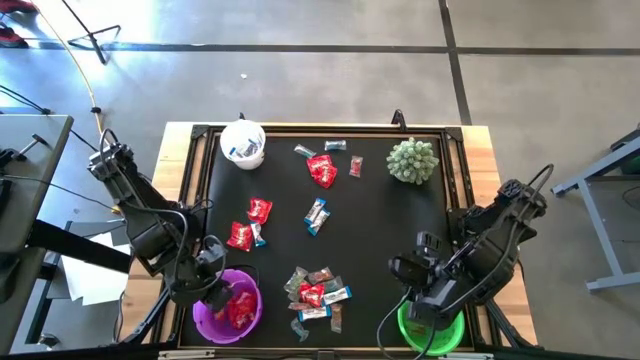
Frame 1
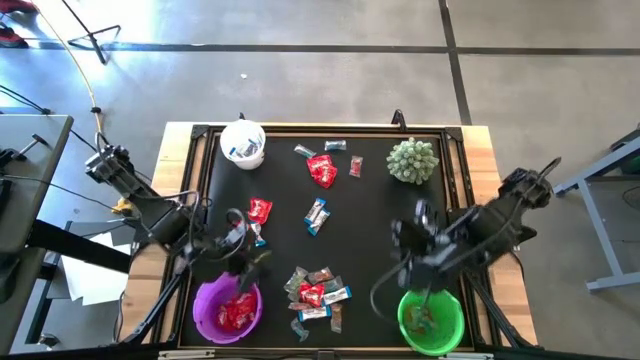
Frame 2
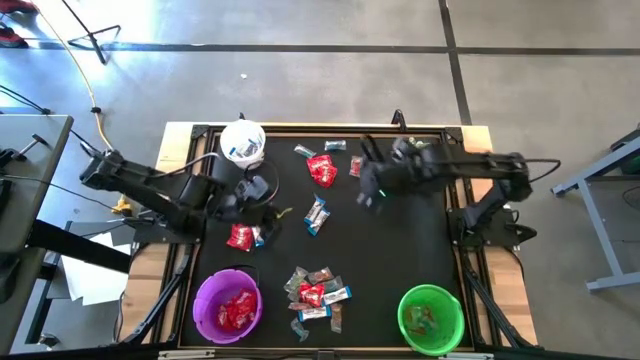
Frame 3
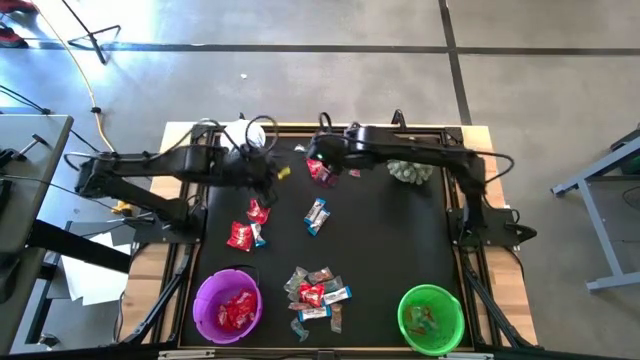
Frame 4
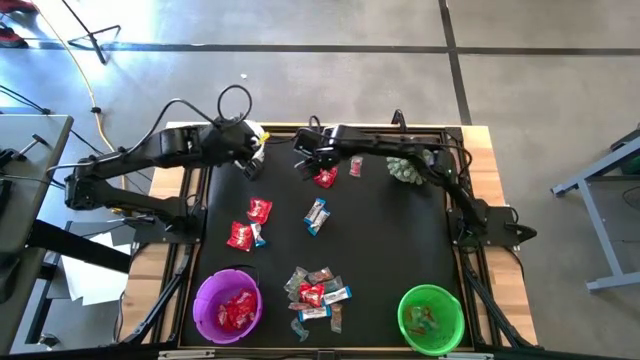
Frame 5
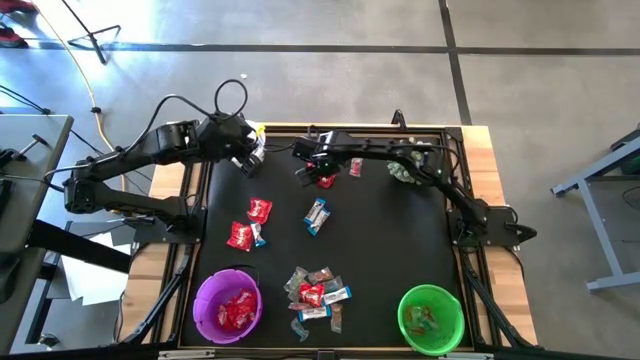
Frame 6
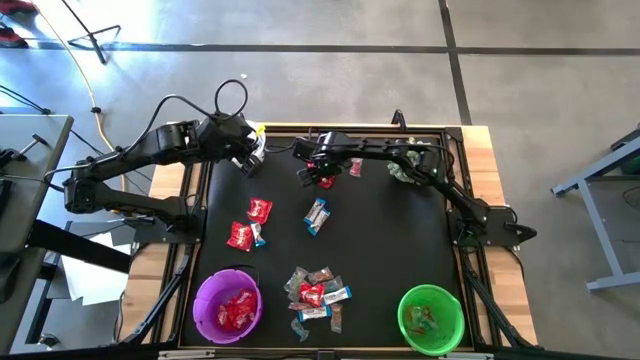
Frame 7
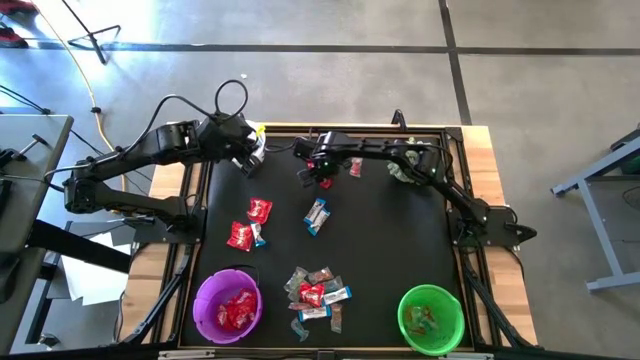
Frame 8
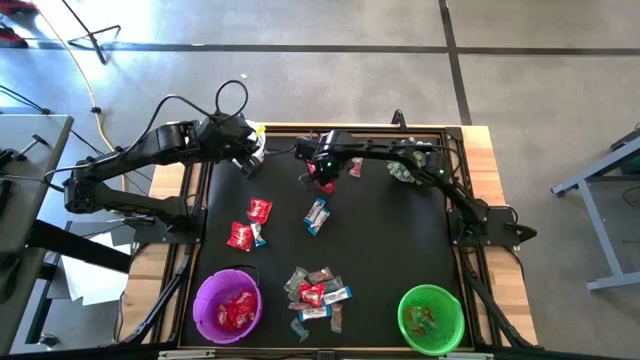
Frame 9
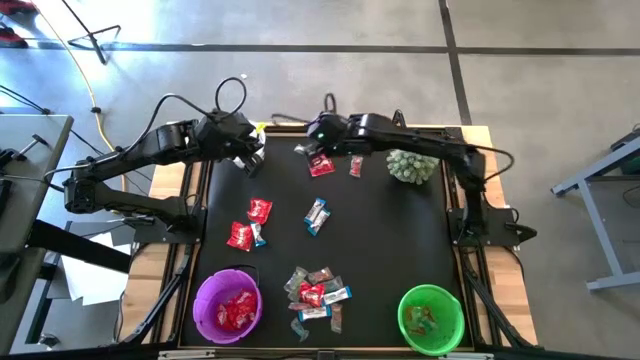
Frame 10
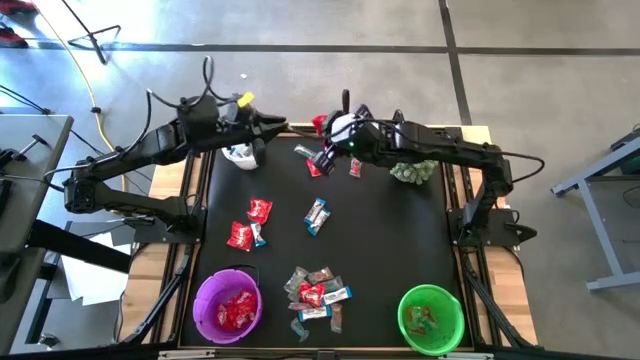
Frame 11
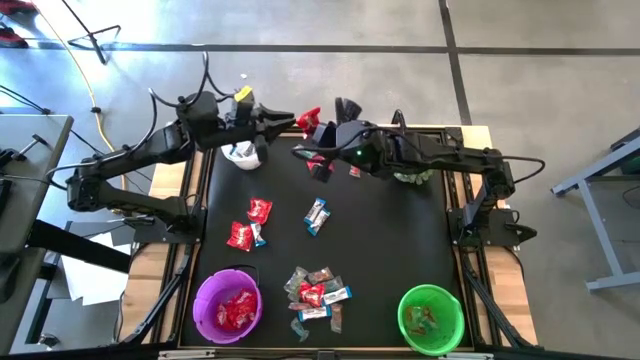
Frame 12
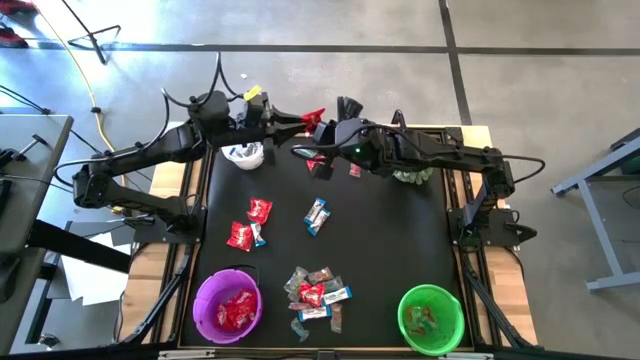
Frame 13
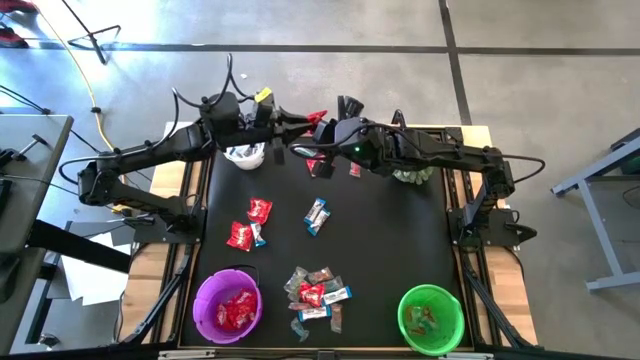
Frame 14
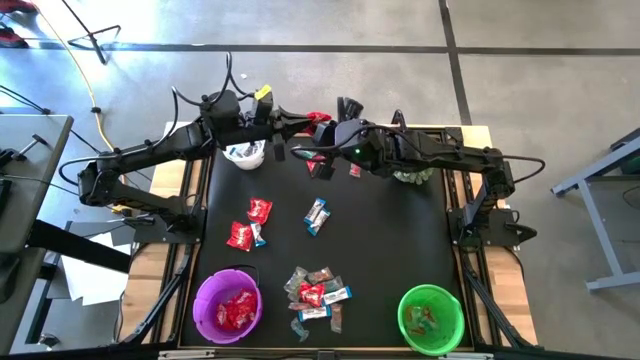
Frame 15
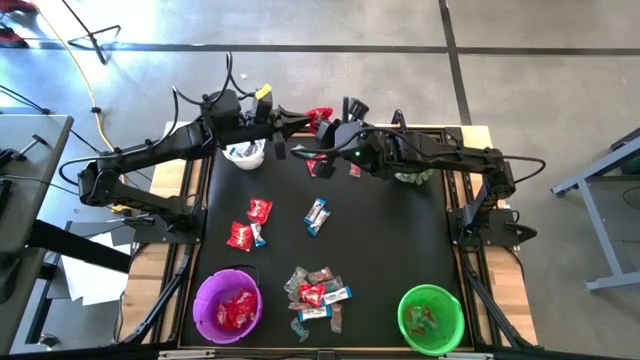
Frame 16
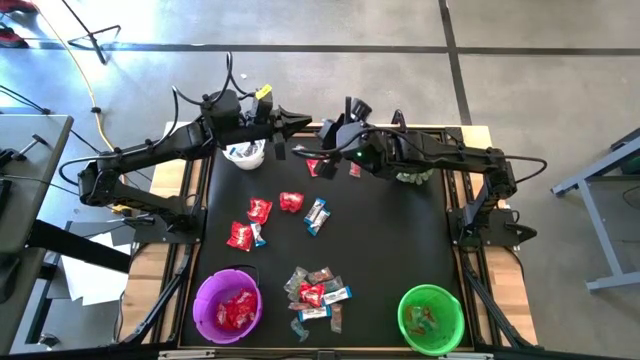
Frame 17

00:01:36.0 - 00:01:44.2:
Task: Sort candy
Put the red candy into the violet bucket

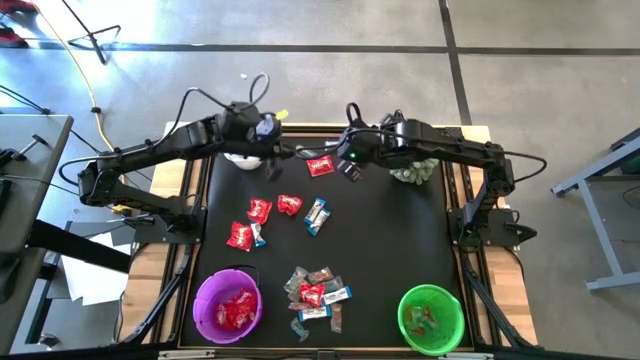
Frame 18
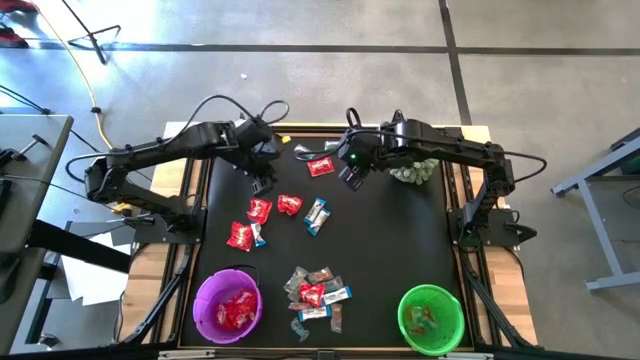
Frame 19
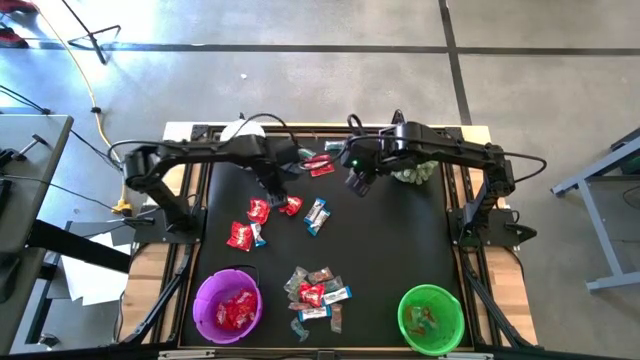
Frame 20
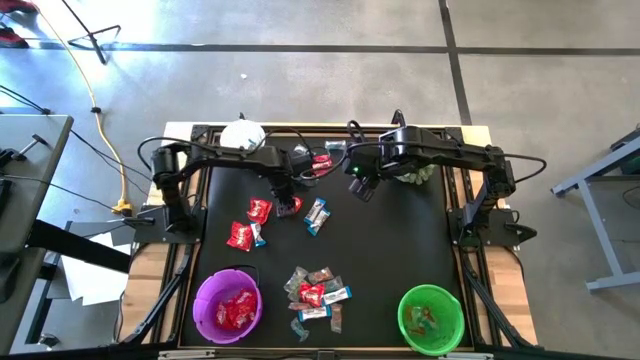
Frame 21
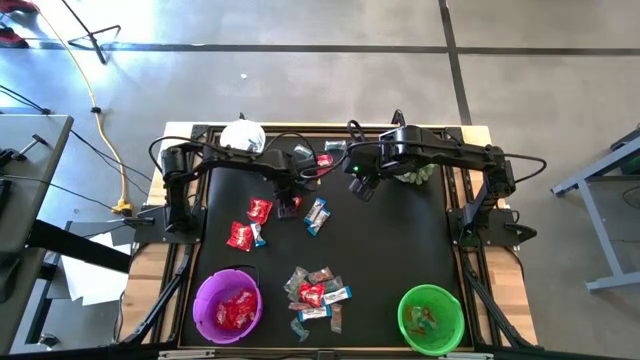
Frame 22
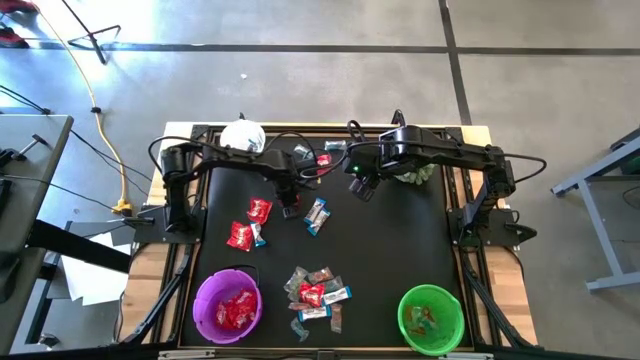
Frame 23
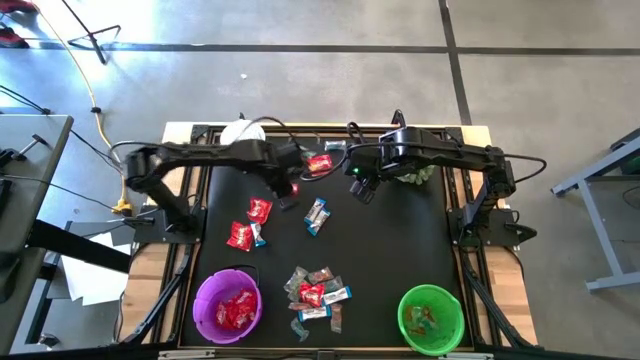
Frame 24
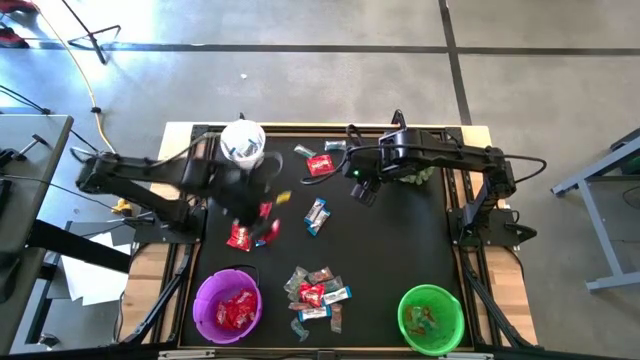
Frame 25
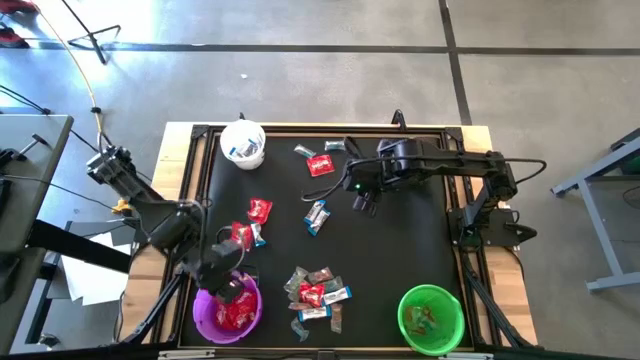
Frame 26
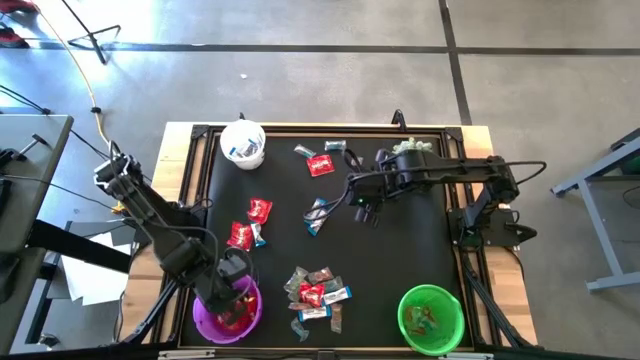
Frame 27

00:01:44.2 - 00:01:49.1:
Put the red candy into the violet bucket

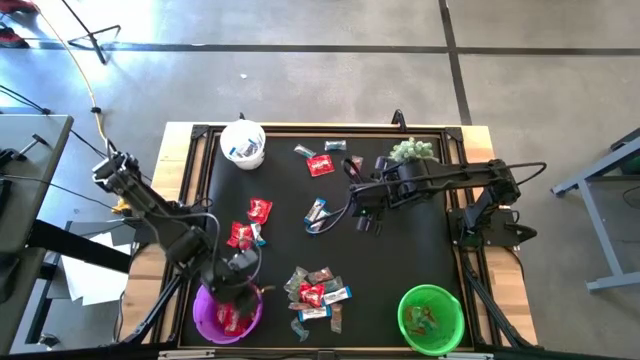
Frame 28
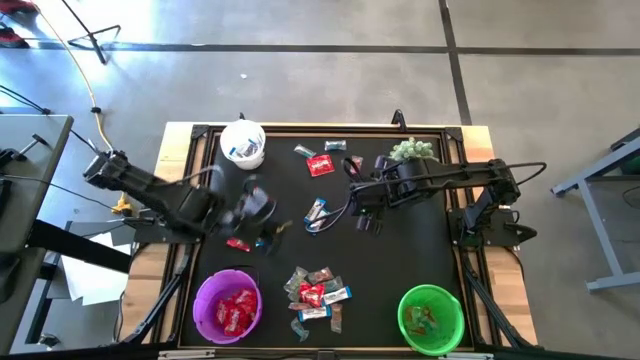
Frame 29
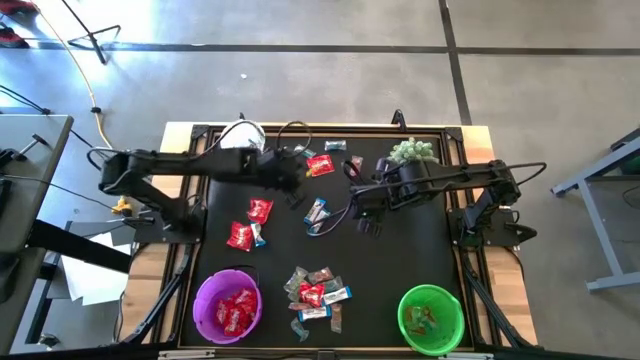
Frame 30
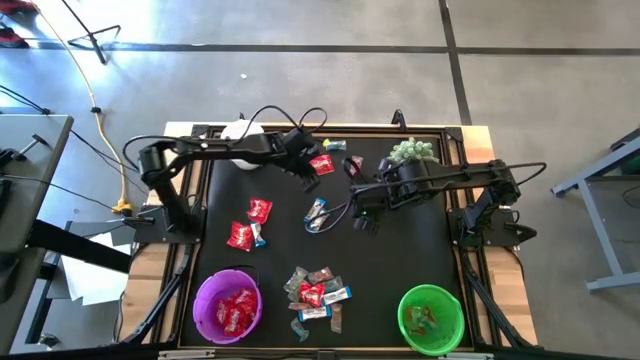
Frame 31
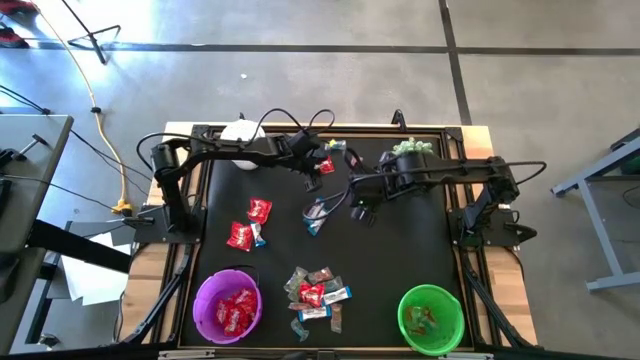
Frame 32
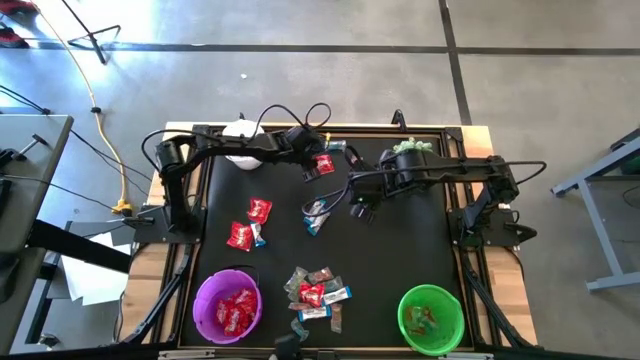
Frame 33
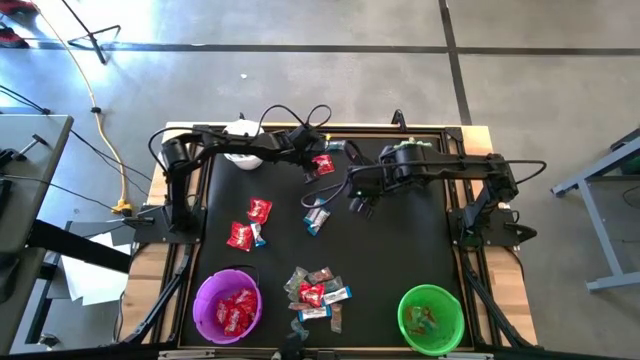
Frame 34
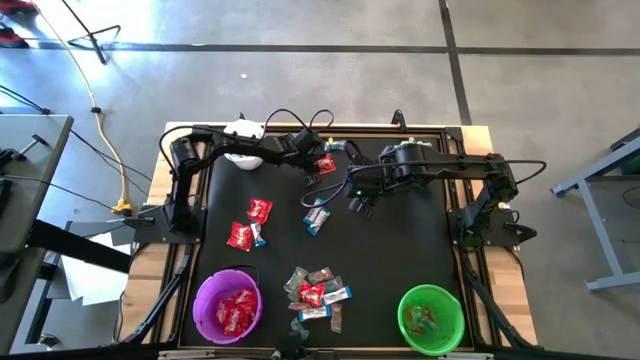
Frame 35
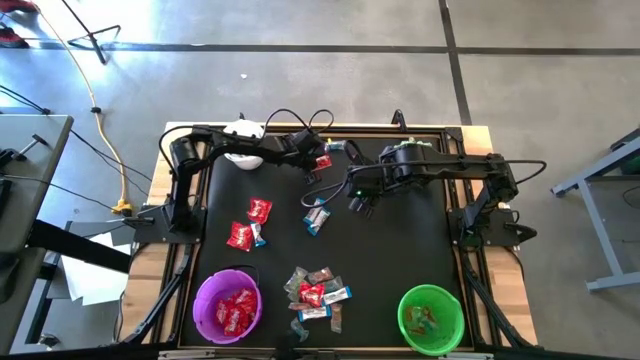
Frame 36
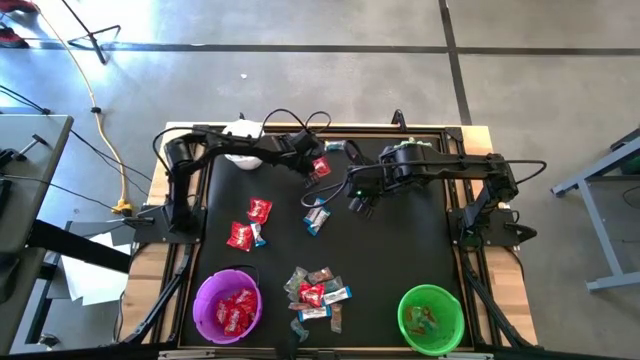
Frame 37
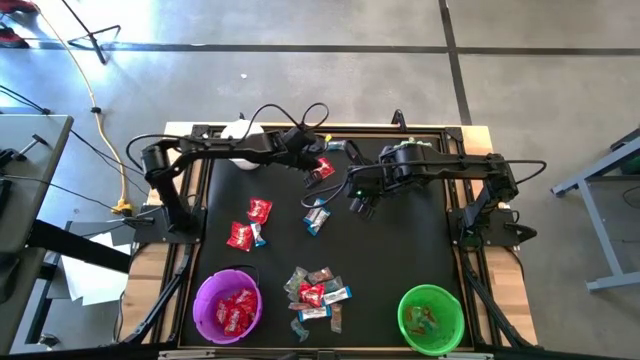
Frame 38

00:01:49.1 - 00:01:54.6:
Put the red candy into the violet bucket
